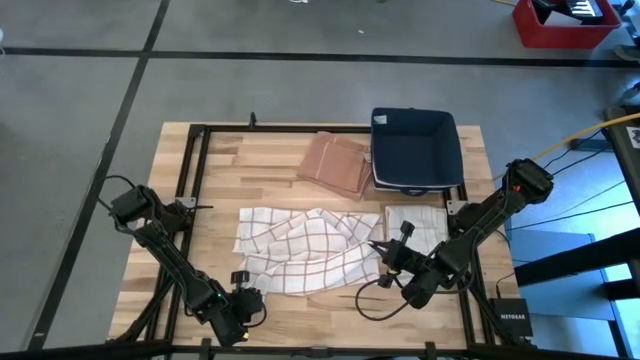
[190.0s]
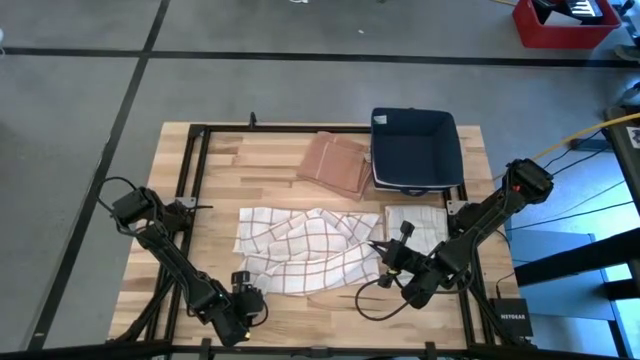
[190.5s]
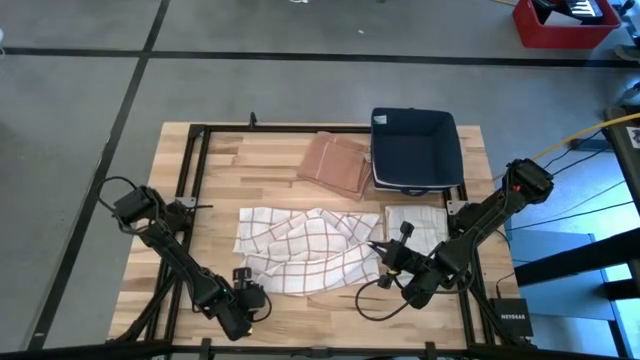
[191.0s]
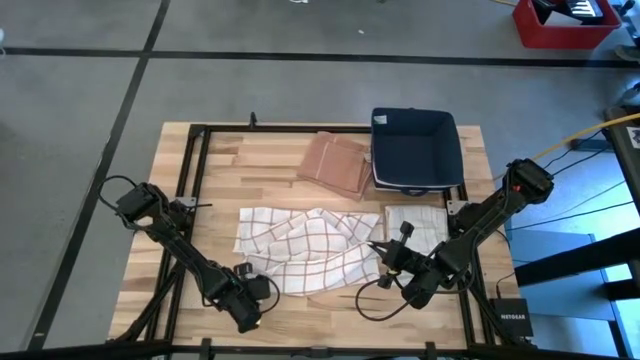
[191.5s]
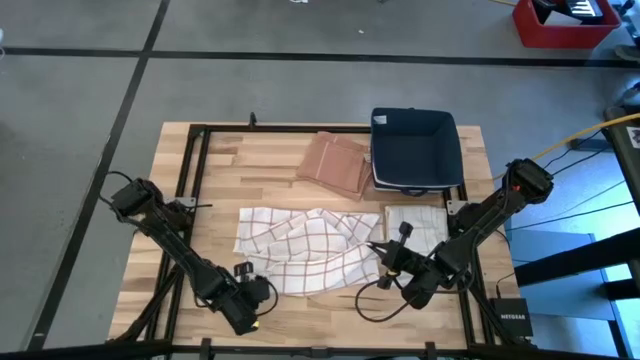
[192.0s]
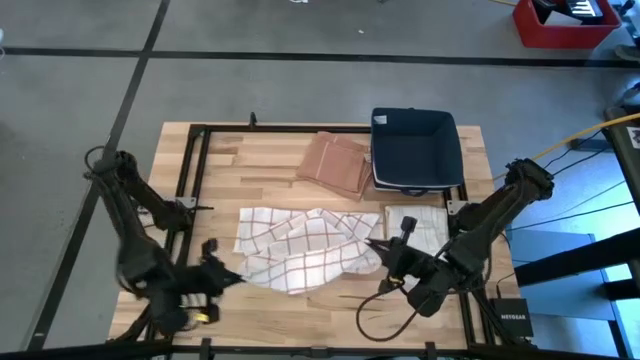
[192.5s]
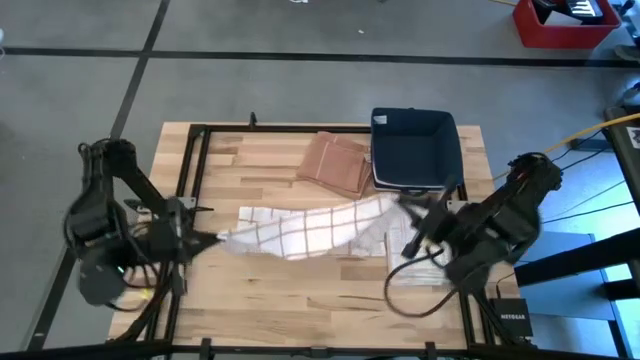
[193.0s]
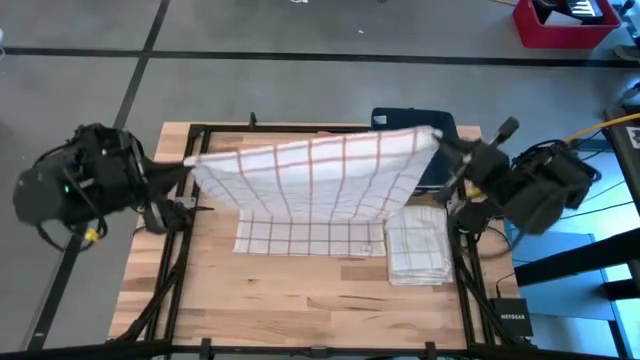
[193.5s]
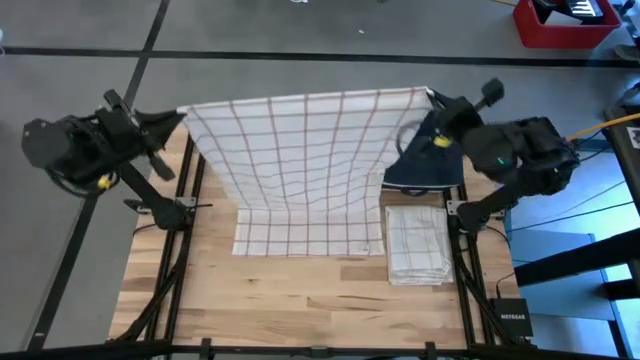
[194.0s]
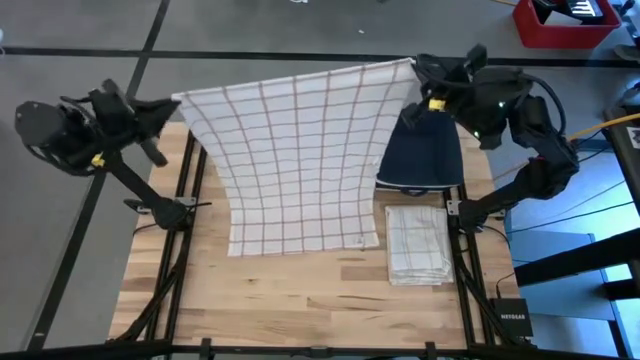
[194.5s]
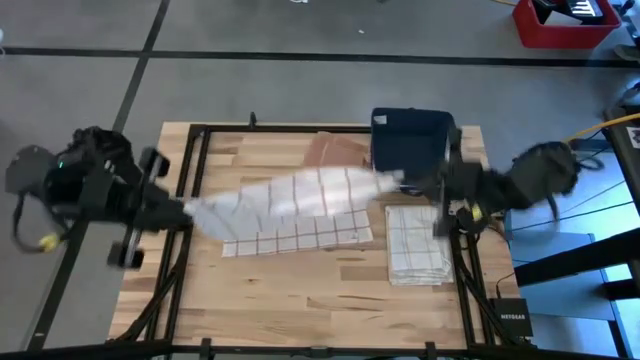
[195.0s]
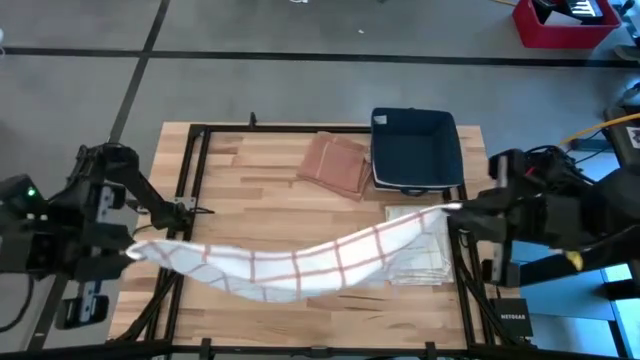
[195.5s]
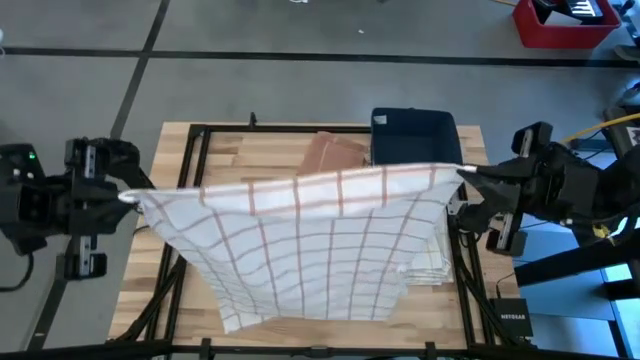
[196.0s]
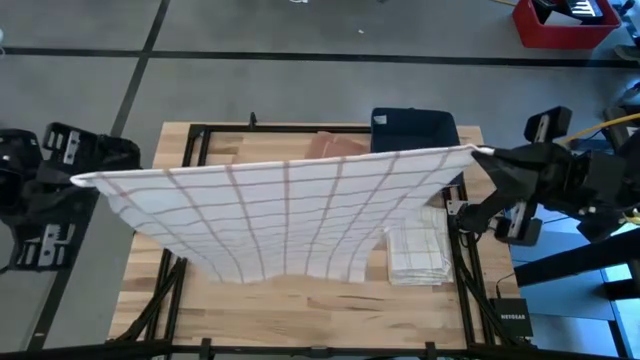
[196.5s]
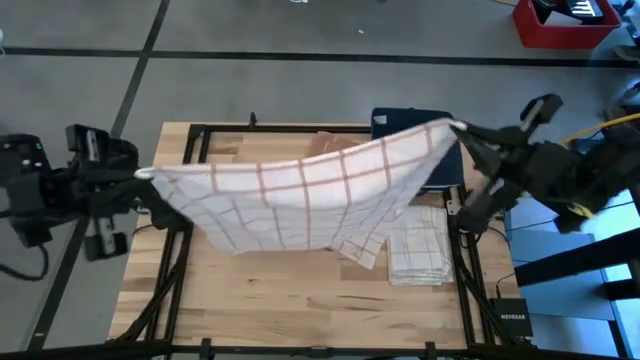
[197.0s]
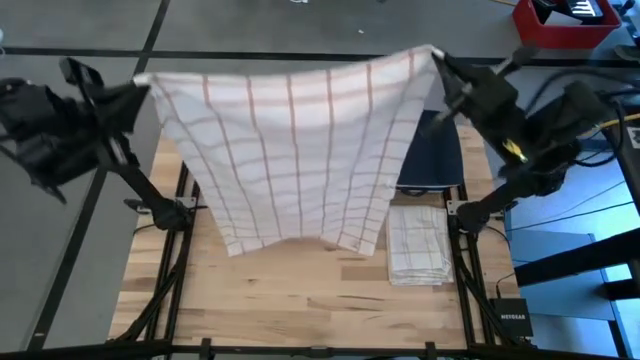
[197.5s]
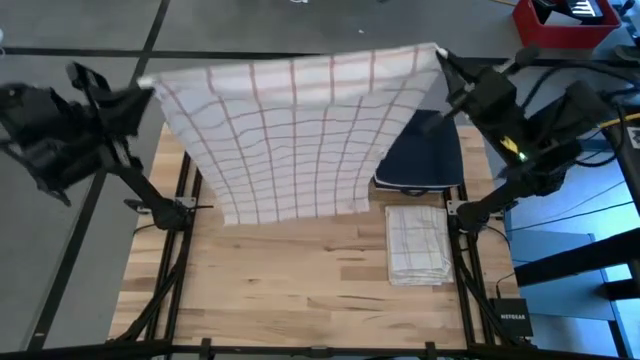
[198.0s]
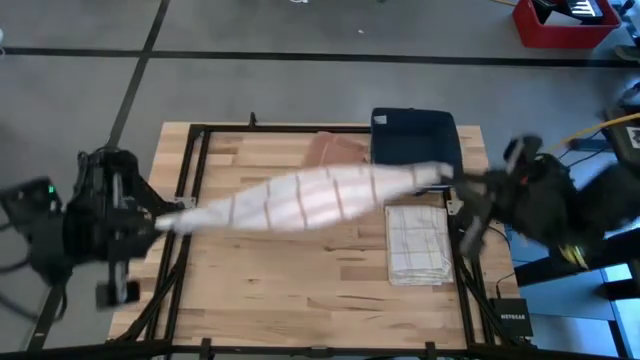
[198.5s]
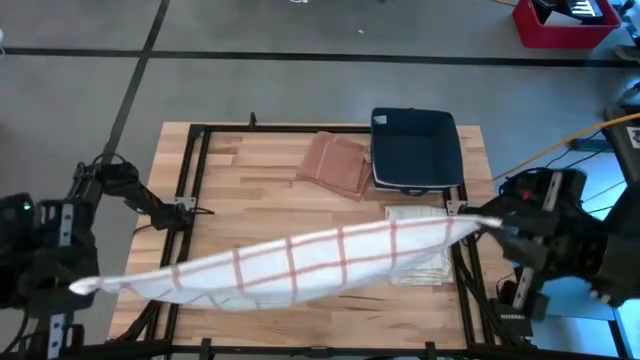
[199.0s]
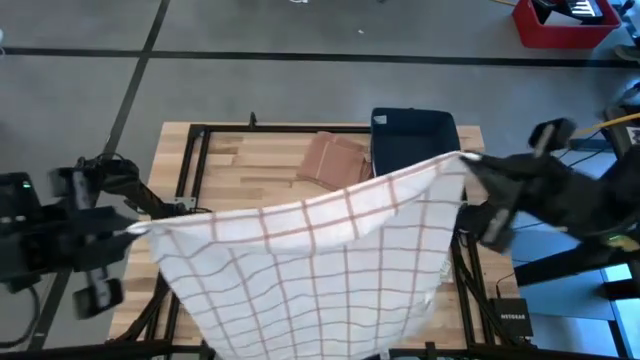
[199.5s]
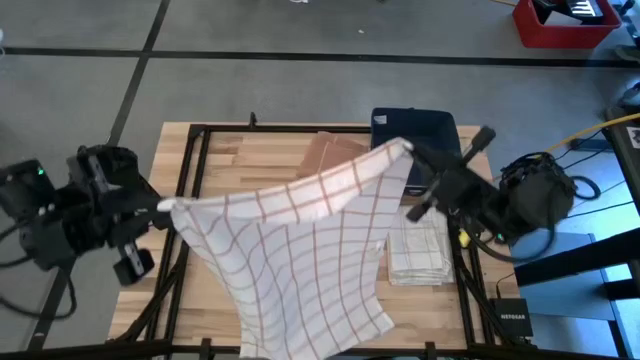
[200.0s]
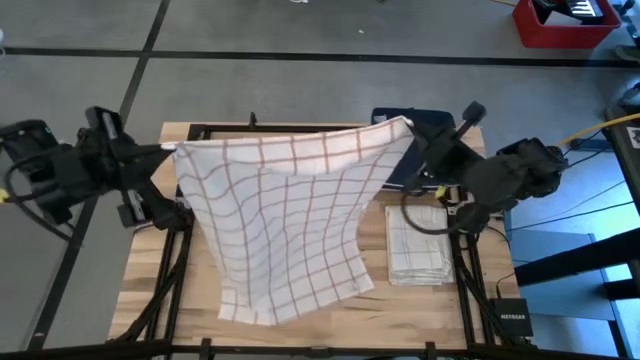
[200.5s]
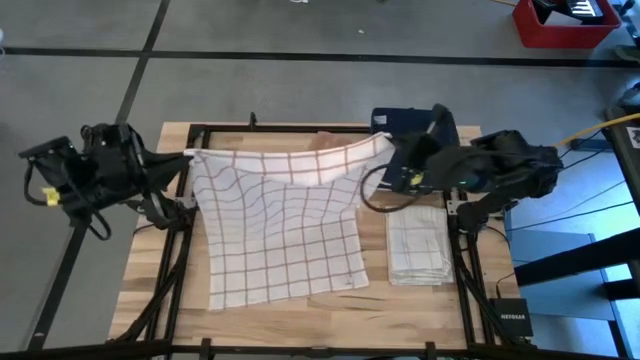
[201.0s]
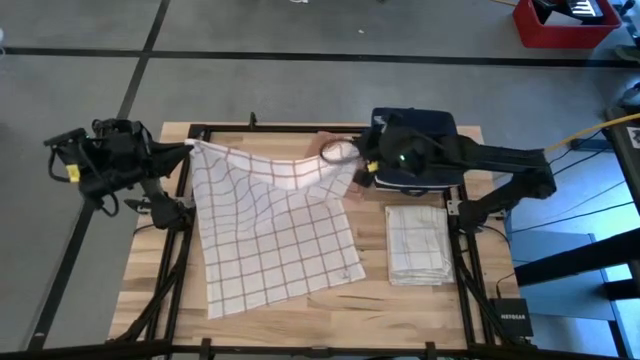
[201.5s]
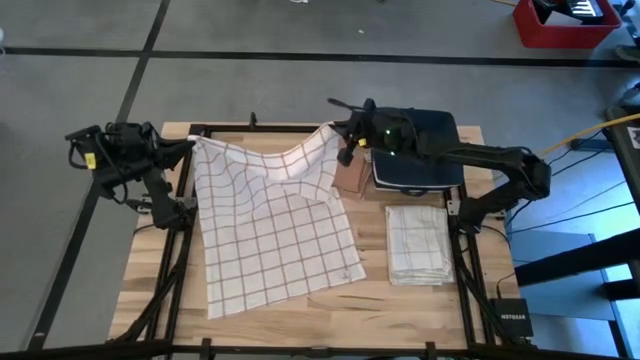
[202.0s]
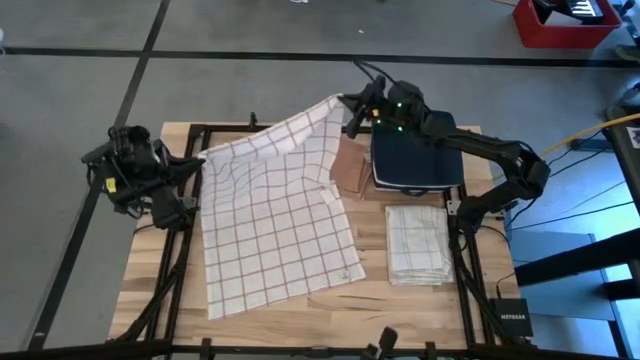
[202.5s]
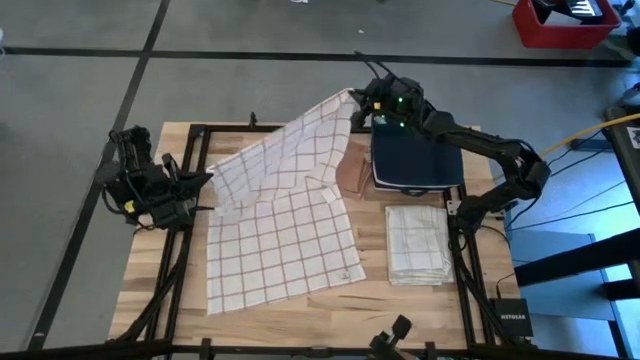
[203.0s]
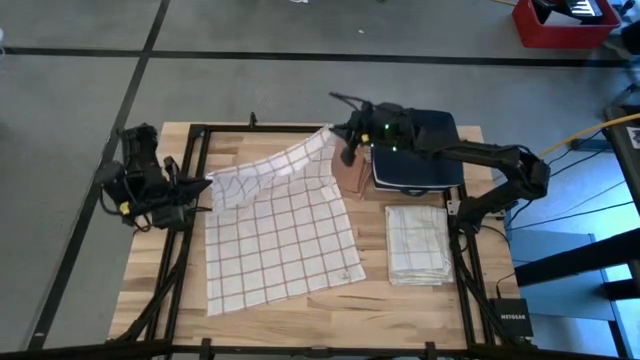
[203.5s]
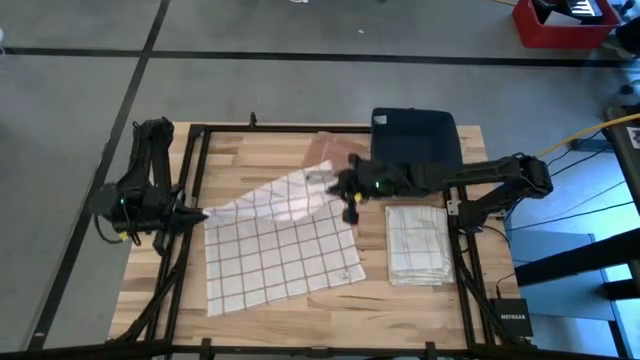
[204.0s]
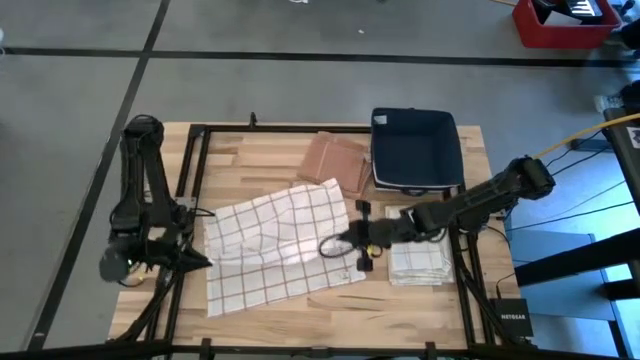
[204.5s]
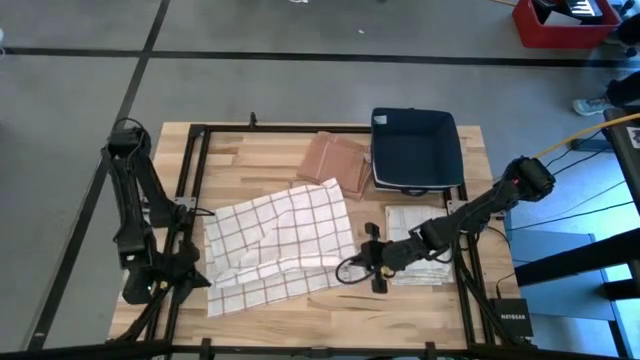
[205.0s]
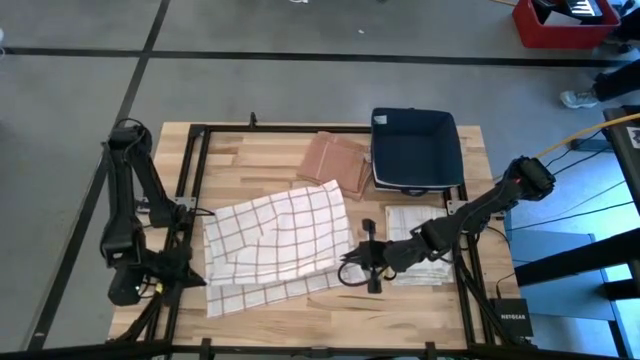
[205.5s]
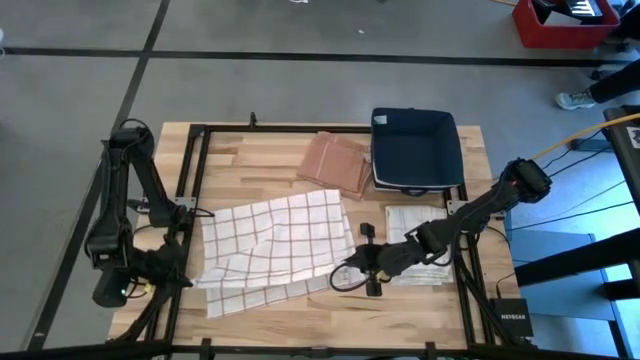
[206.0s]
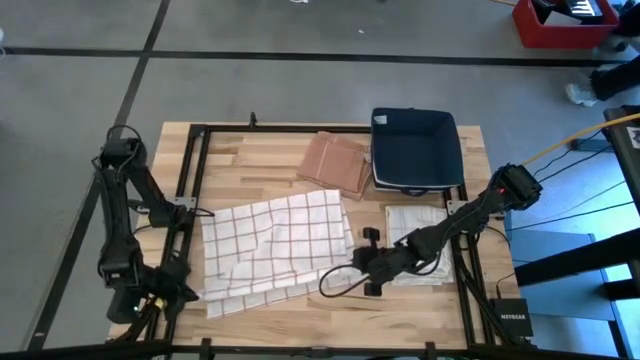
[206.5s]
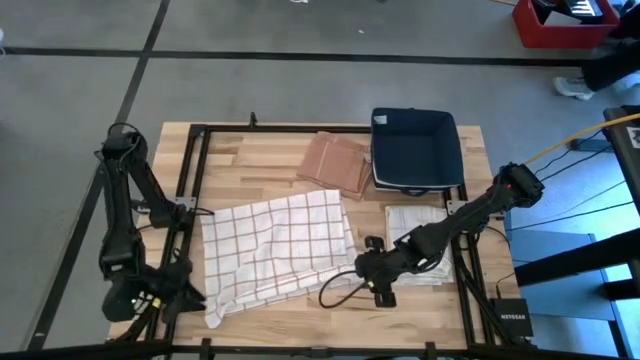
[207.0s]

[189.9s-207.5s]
Task: Fold towel
Fold the white towel

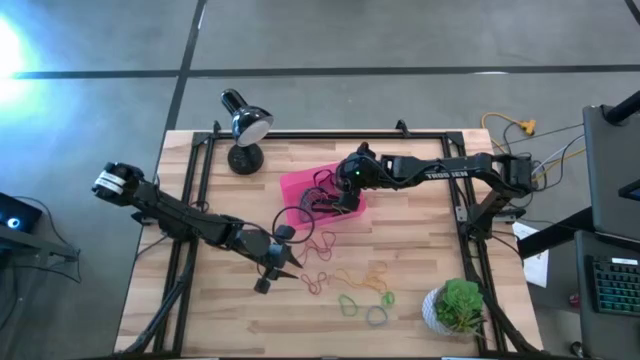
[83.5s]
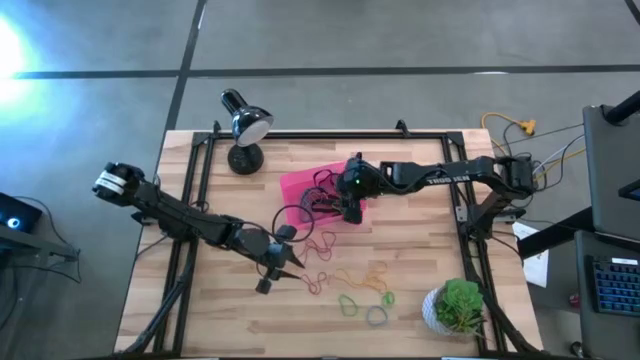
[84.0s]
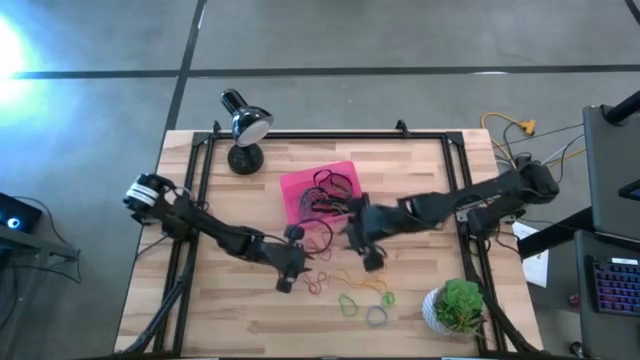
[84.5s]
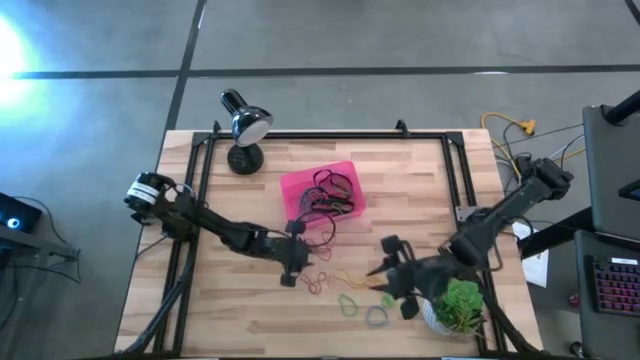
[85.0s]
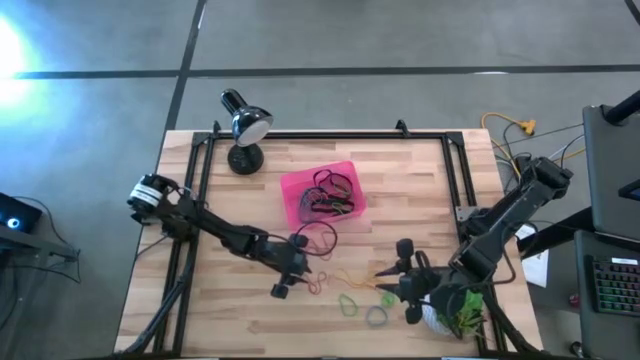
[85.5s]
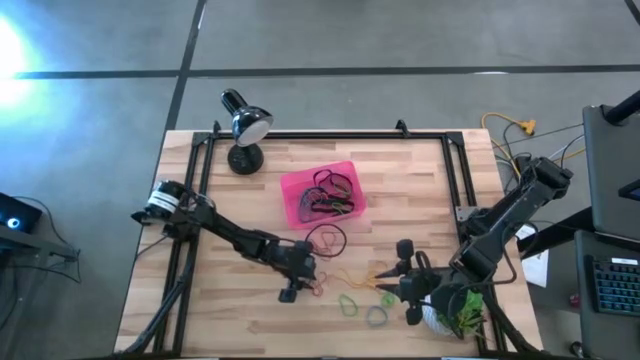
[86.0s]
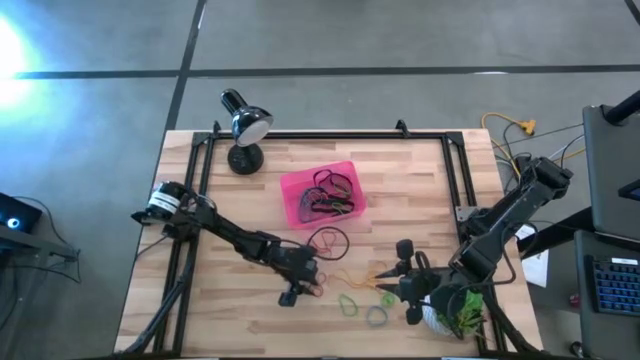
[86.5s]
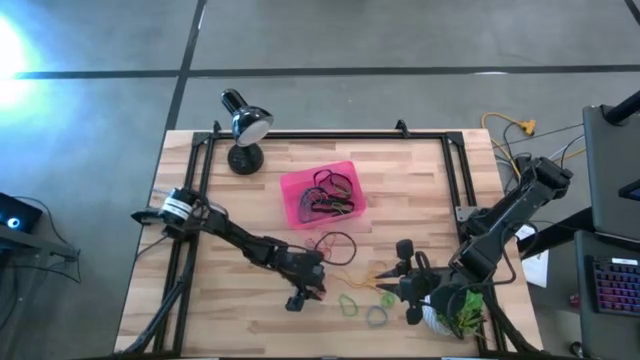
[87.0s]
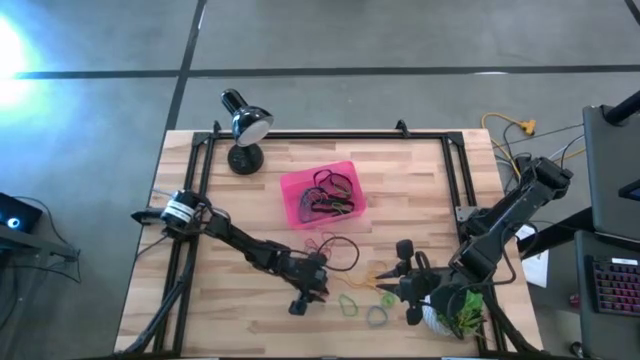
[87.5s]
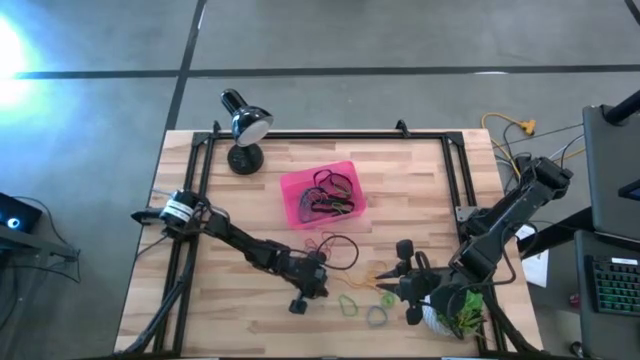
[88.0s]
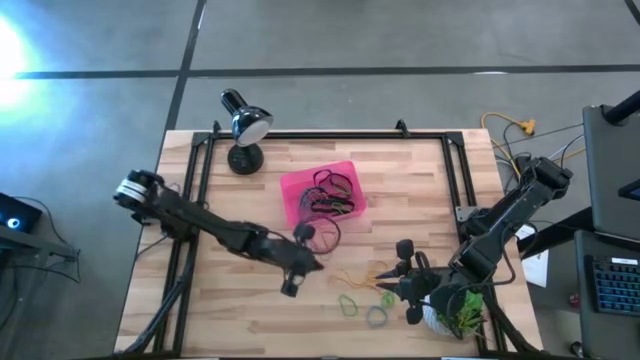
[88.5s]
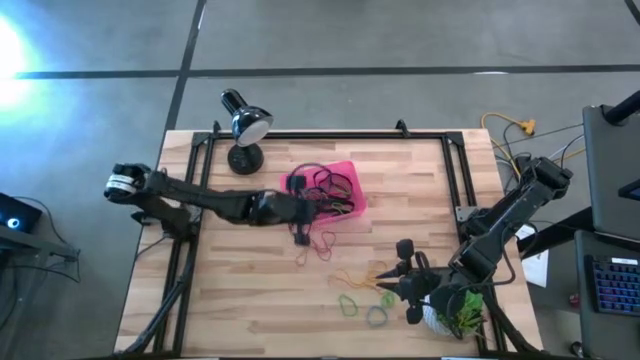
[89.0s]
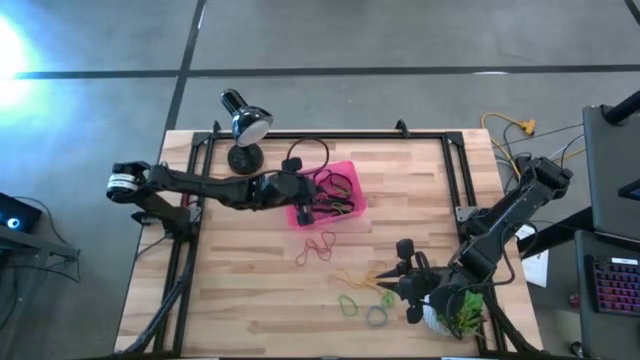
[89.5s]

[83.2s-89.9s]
Task: Pick and place rubber bands into bin
Put the red rubber band into the red bin
